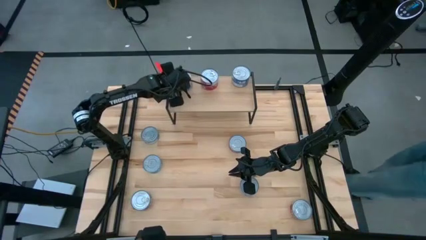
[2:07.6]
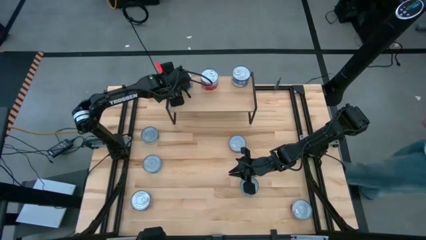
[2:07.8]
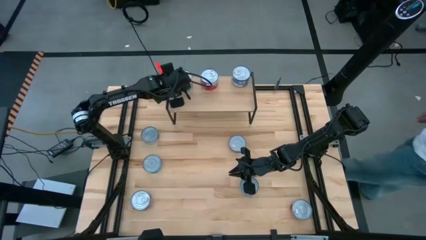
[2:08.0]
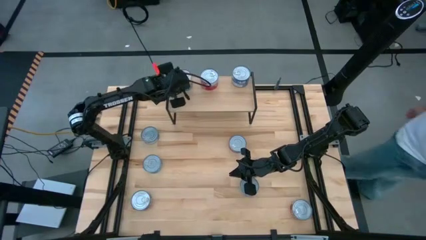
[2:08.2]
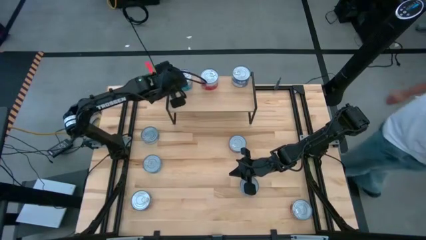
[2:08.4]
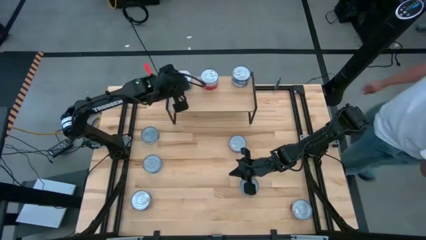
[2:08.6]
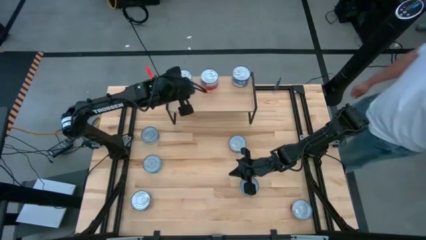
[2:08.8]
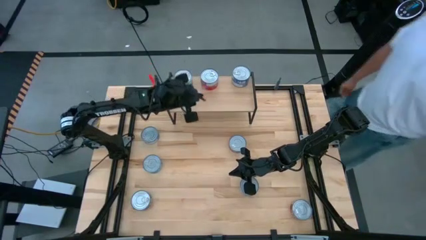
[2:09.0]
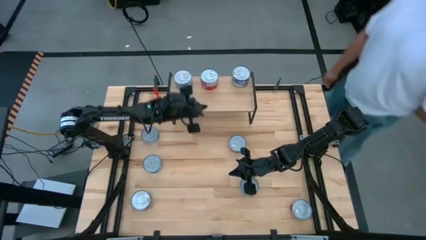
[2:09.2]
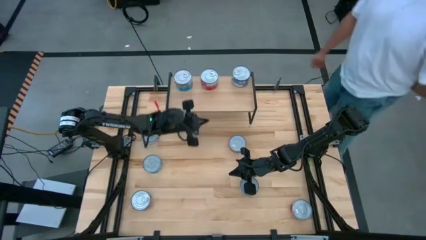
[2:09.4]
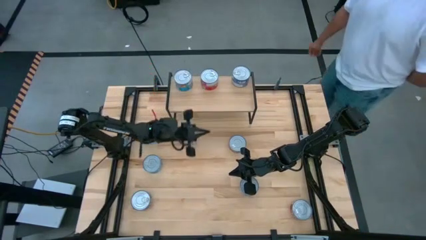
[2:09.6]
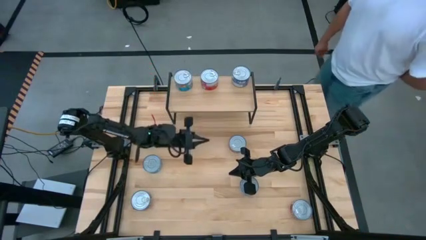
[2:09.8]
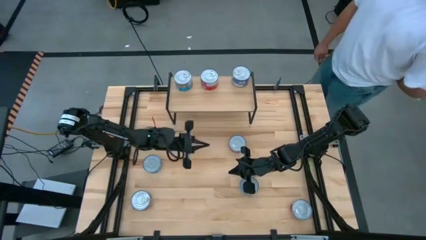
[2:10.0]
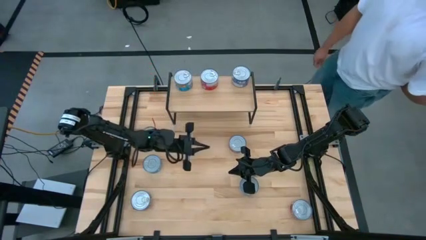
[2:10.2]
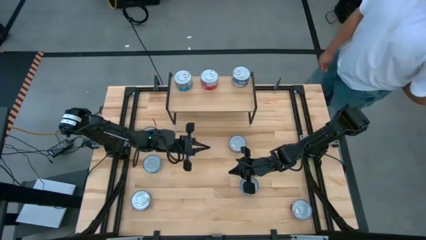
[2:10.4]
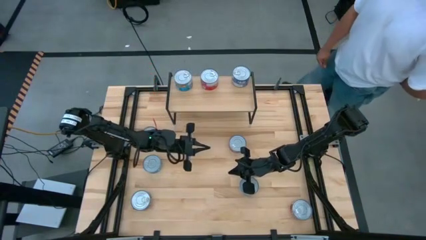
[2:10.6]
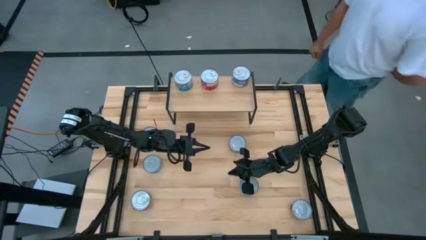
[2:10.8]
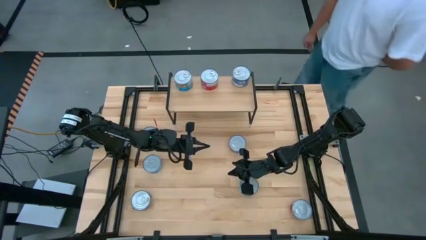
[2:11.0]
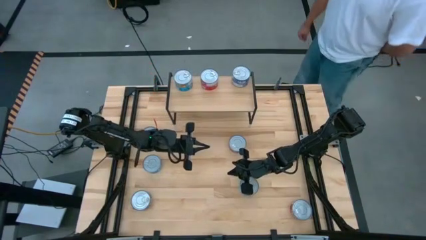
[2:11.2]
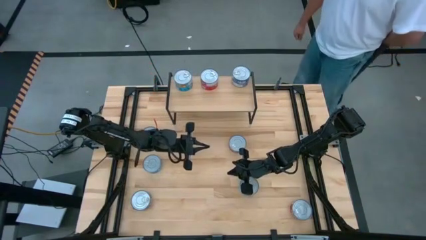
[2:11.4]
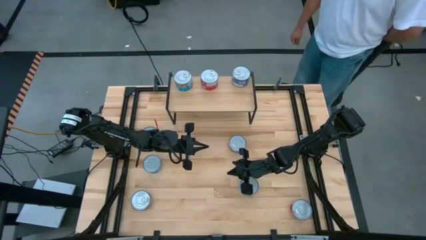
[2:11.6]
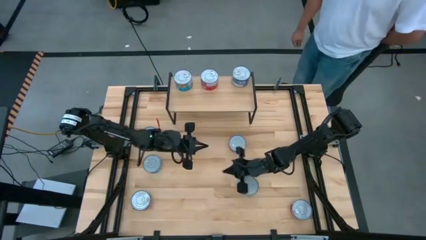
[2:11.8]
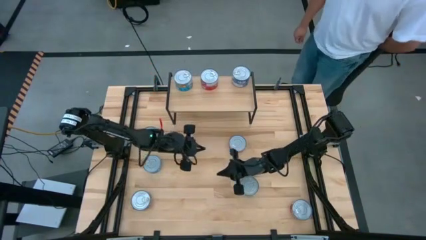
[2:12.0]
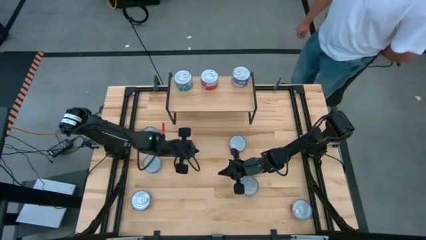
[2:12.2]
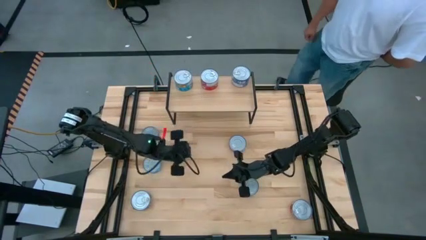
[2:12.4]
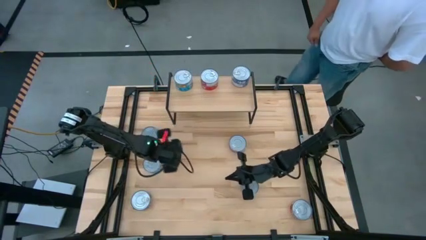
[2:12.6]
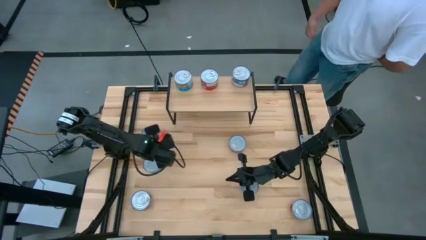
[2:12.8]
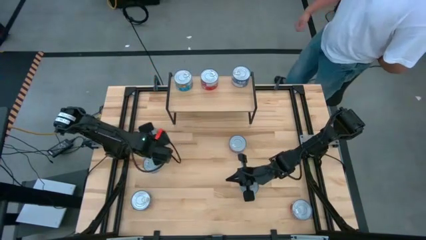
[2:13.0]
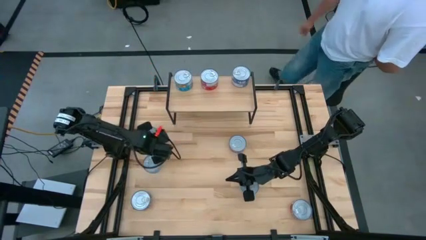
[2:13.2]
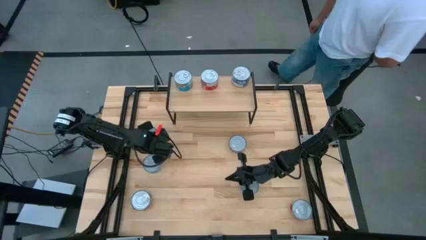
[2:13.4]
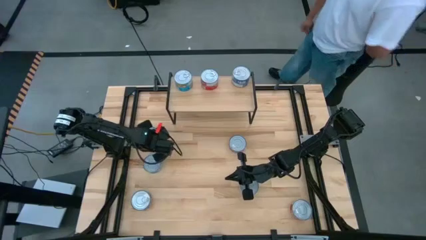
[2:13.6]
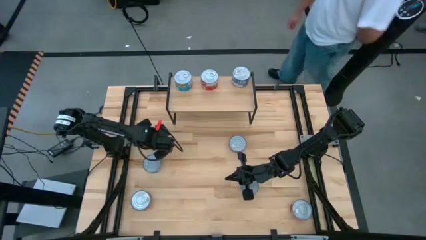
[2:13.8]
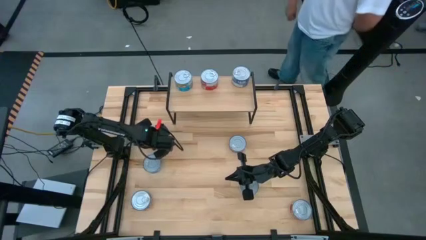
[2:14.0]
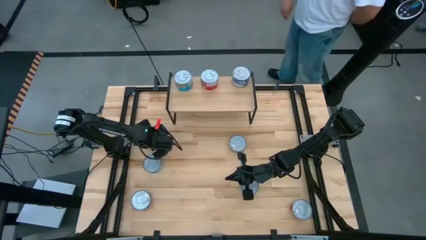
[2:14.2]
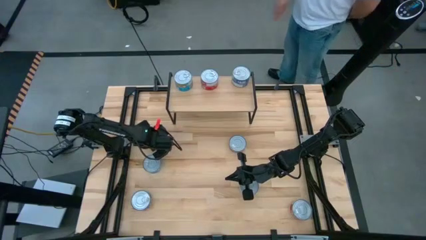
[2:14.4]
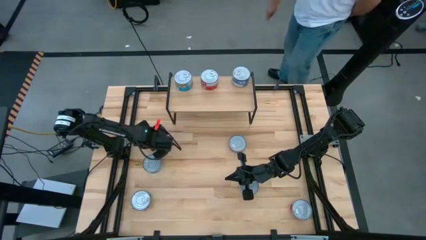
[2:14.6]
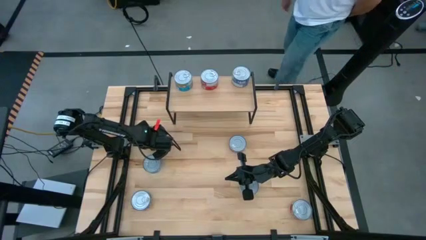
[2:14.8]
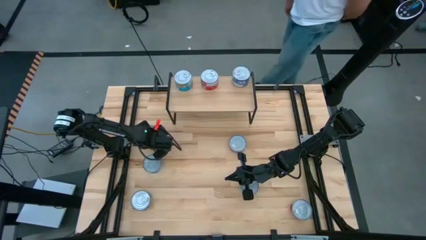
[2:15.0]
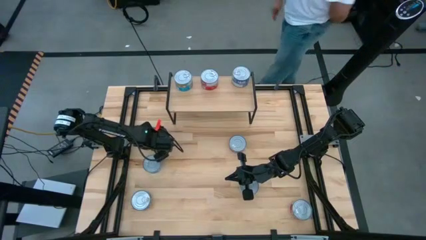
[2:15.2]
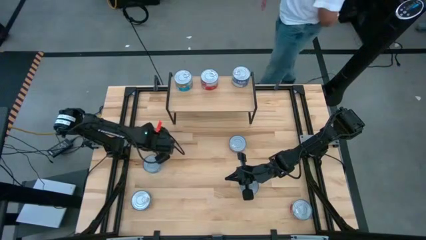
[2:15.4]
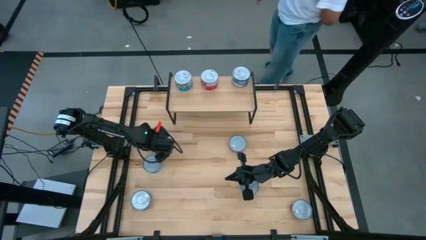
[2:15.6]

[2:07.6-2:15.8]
Task: Stack canned seafood by type on shelf
Put the blue tuna can on the shelf aligned with the other blue tuna can

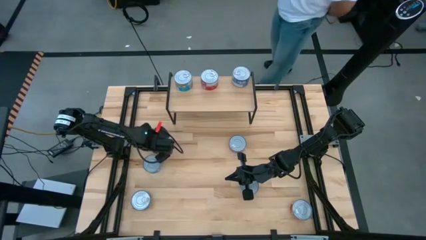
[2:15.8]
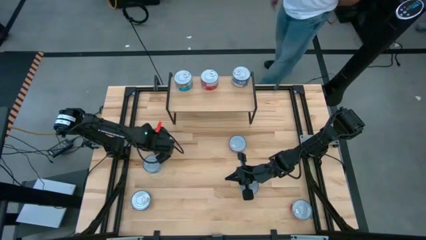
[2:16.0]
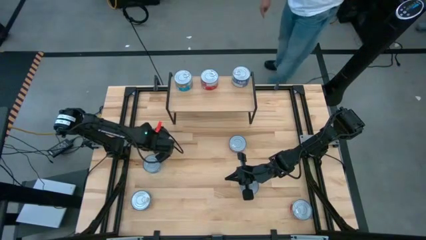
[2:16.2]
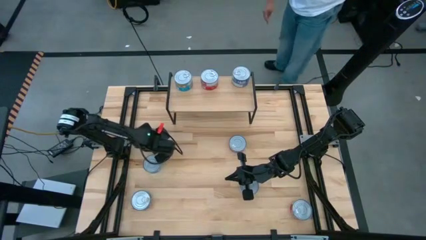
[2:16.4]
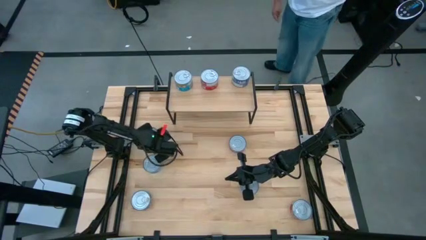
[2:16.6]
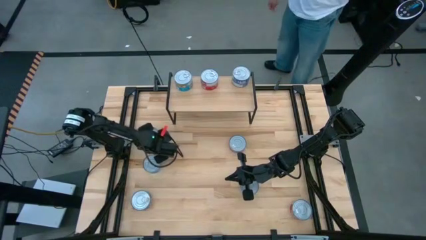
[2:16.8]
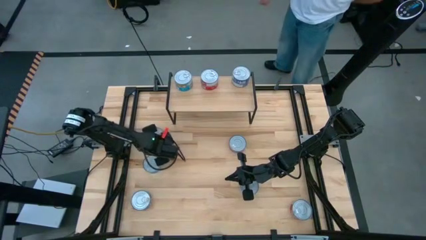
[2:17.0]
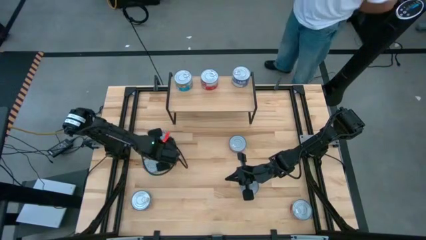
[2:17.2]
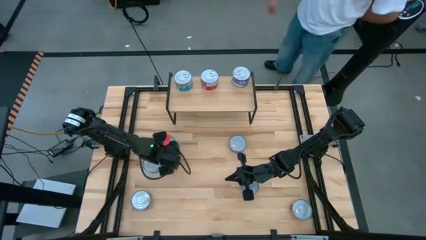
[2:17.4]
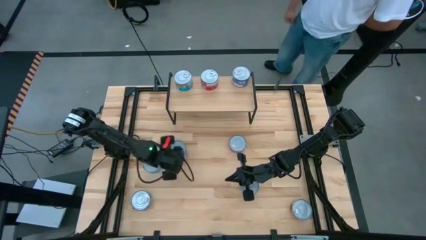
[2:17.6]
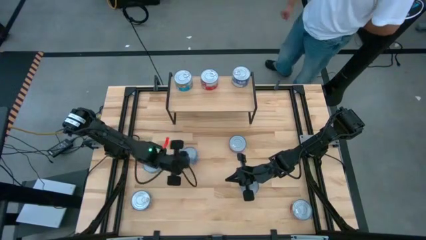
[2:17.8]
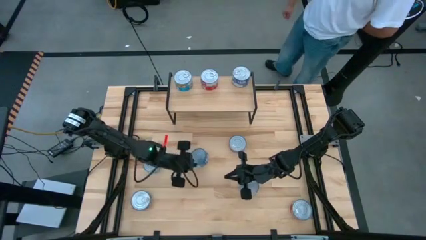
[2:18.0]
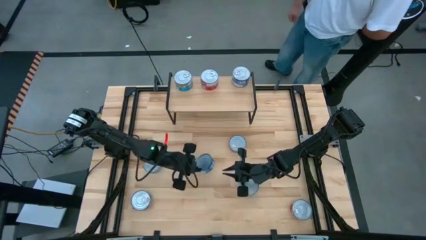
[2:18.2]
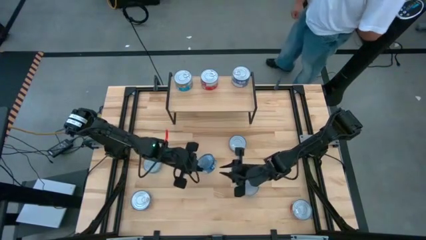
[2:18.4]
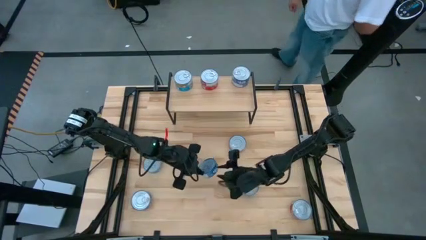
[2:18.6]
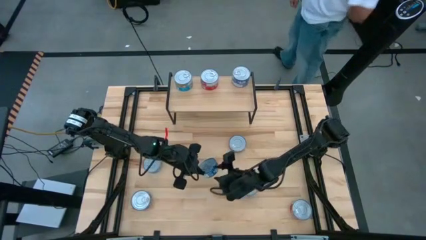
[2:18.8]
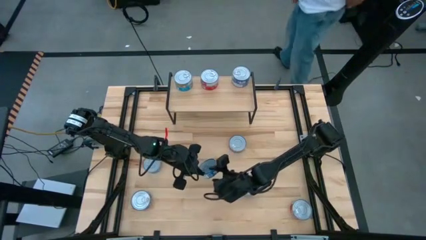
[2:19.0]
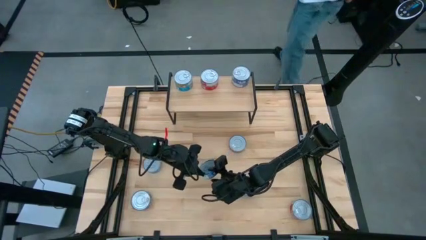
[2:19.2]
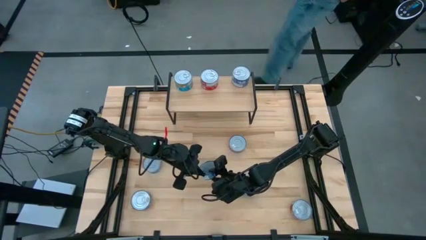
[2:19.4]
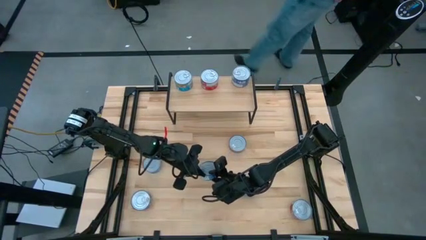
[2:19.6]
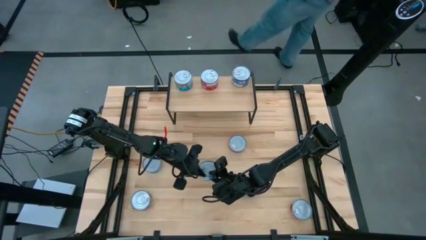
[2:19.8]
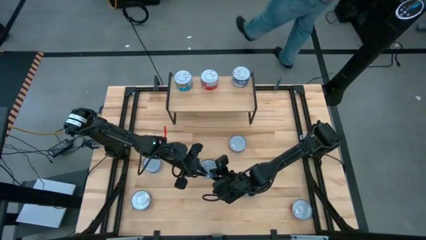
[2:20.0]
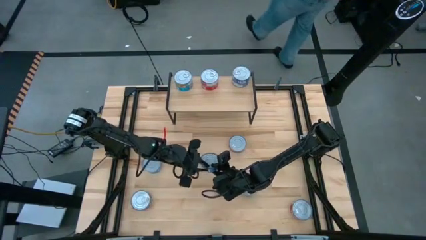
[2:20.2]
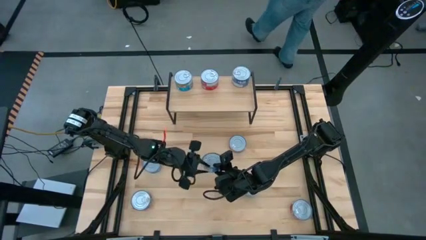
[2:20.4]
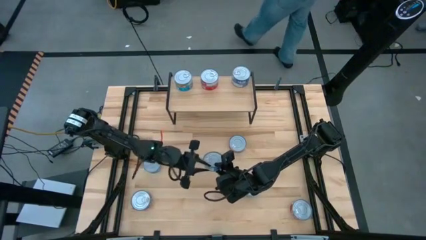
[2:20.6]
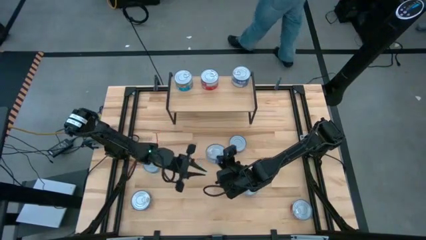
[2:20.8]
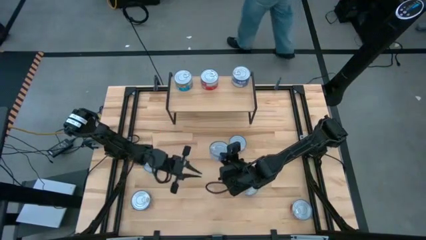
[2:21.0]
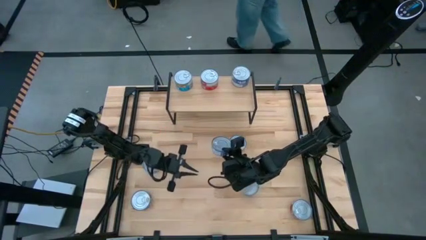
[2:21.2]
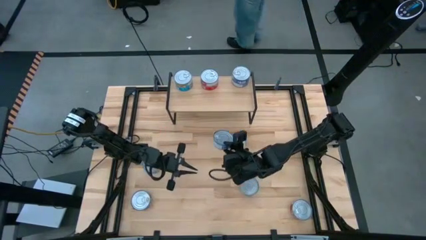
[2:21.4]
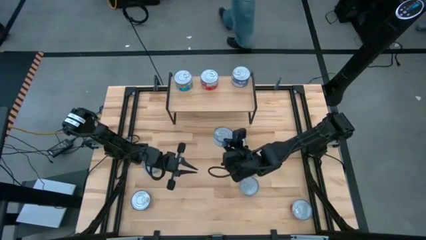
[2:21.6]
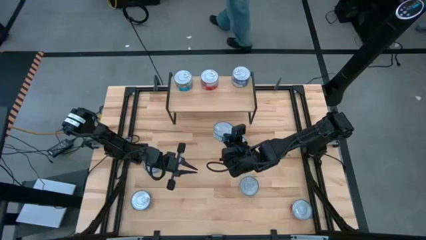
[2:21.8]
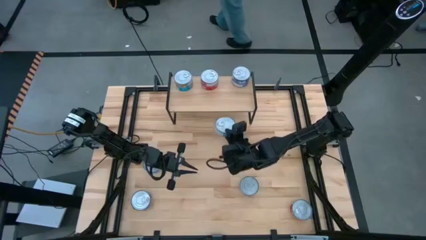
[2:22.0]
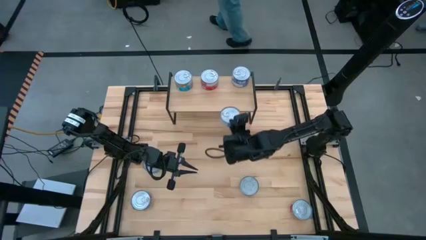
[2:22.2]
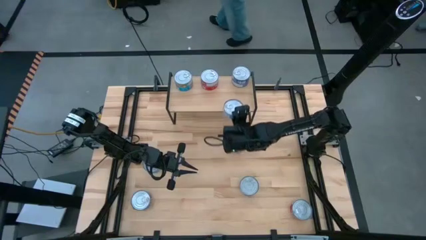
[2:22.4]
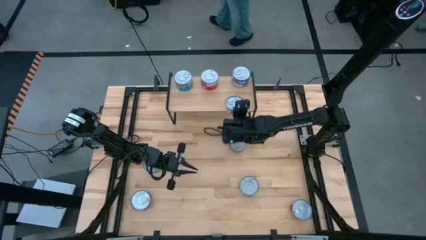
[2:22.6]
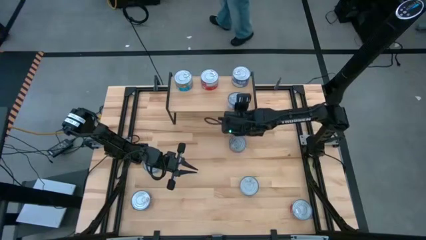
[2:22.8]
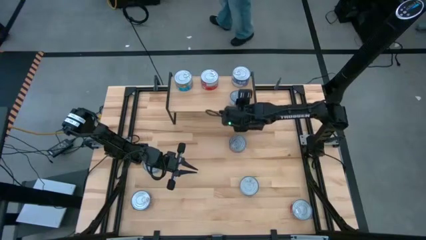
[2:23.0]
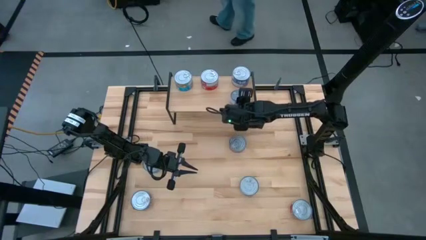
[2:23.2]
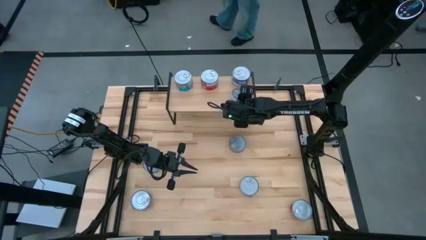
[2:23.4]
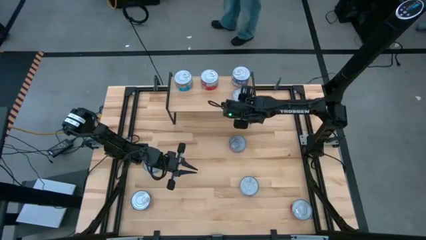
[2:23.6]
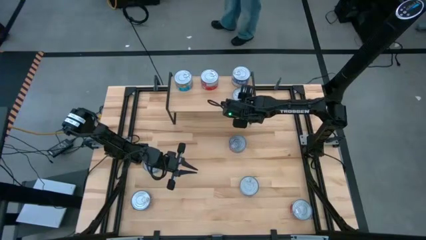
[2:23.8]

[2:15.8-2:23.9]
Put the blue tuna can on the shelf aligned with the other blue tuna can

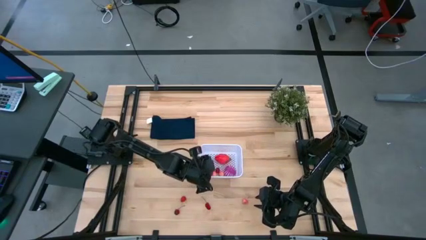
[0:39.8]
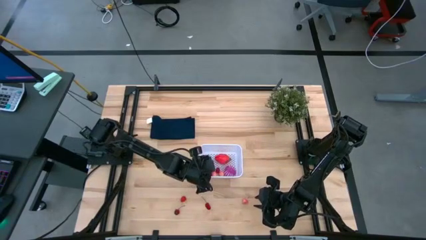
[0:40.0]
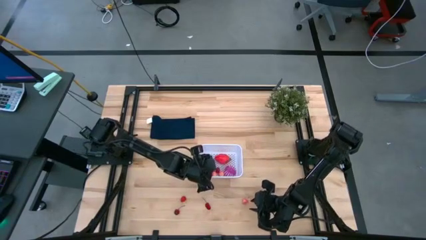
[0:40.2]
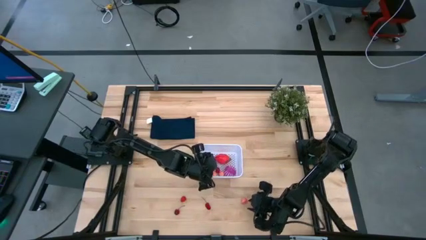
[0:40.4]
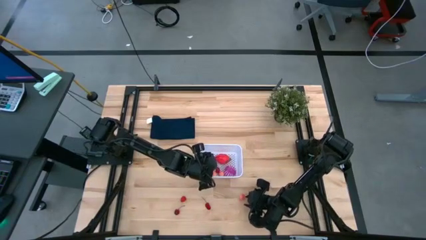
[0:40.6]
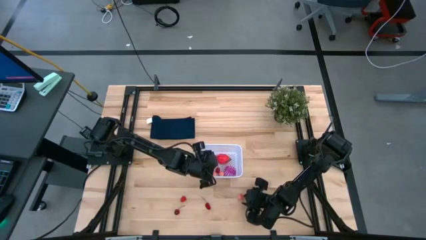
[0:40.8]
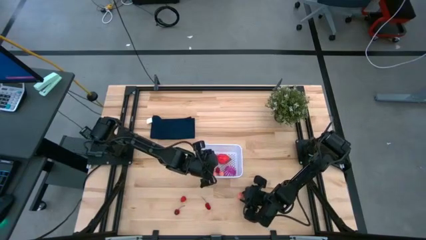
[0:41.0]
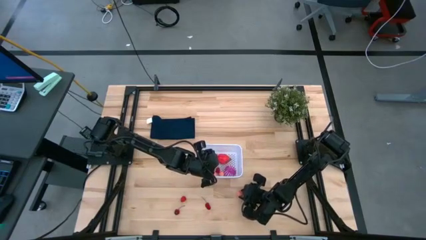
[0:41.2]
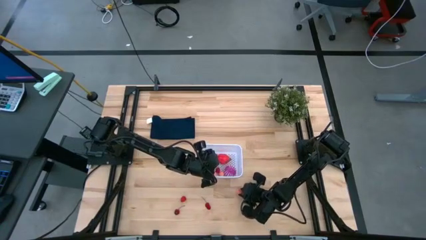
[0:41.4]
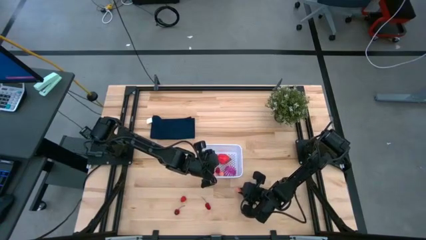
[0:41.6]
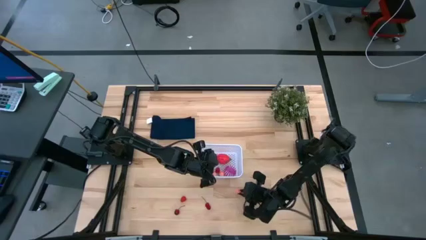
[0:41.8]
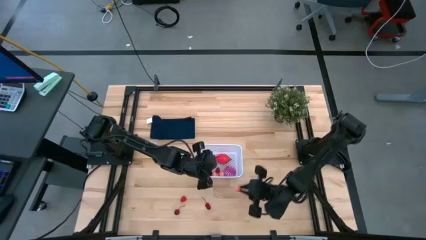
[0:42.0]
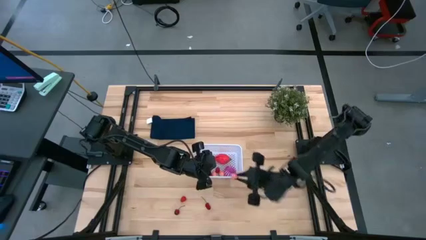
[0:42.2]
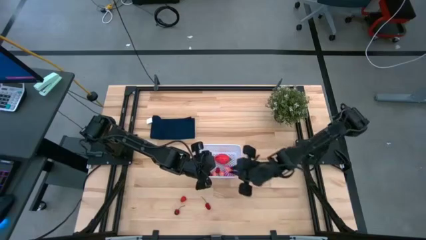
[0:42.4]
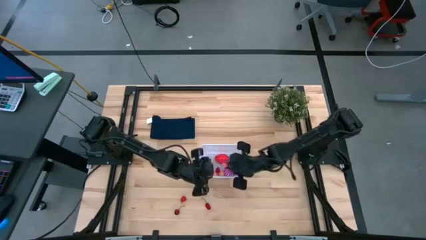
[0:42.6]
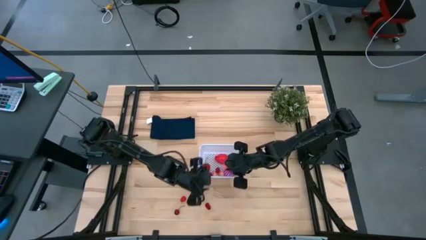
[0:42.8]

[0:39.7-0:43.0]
Task: Pick and placing Produce into tupperware
Put the peach into the white bin
